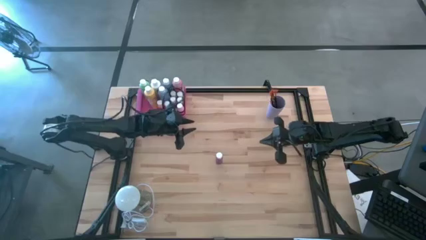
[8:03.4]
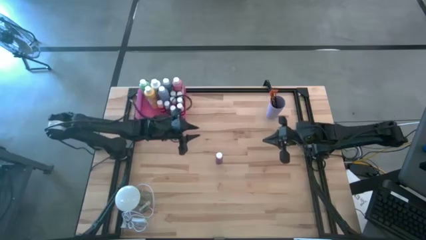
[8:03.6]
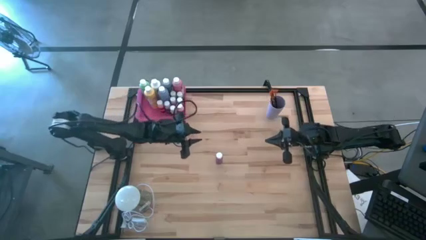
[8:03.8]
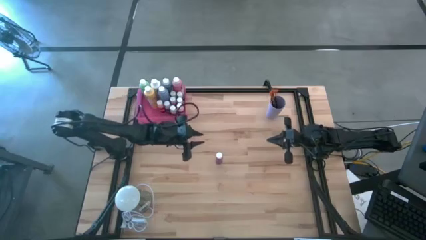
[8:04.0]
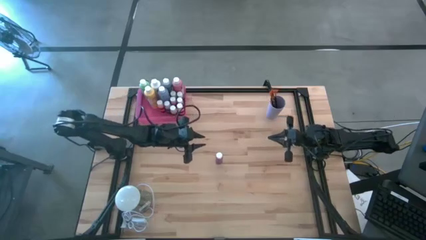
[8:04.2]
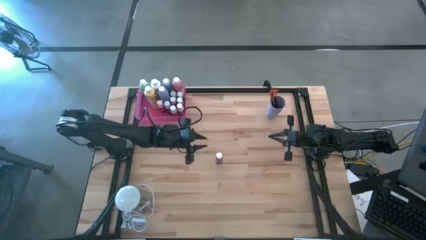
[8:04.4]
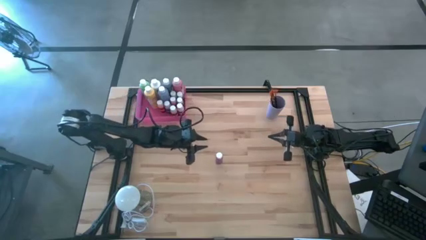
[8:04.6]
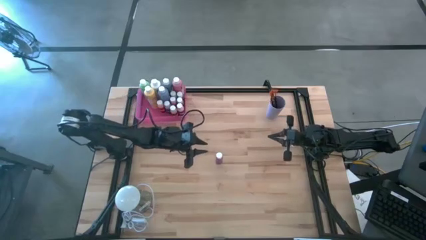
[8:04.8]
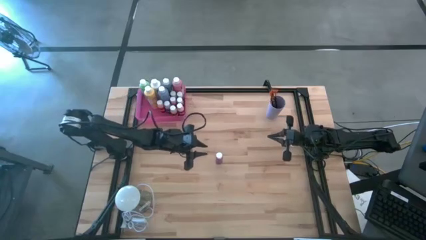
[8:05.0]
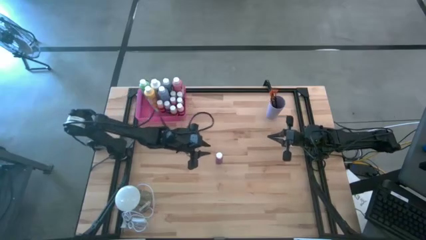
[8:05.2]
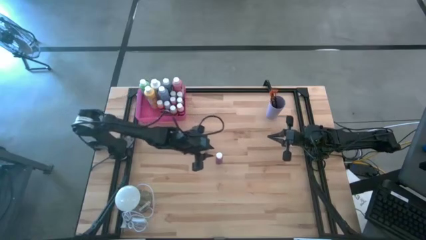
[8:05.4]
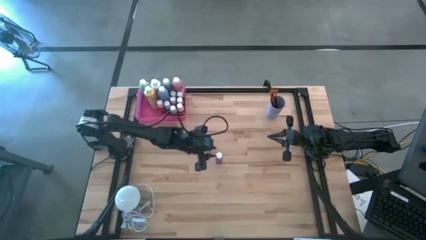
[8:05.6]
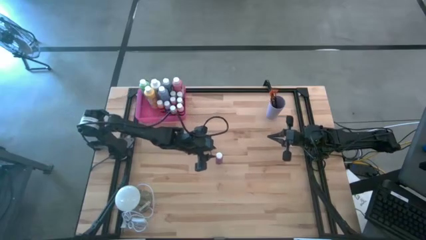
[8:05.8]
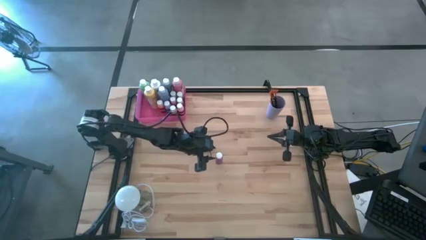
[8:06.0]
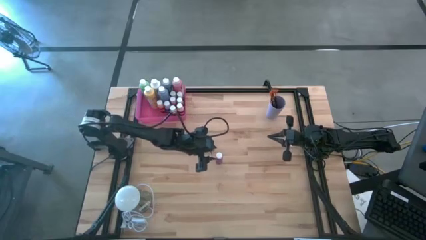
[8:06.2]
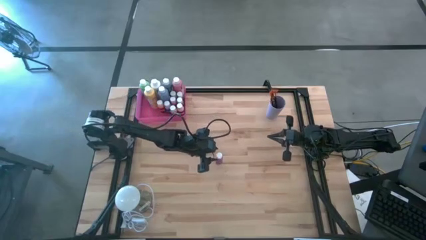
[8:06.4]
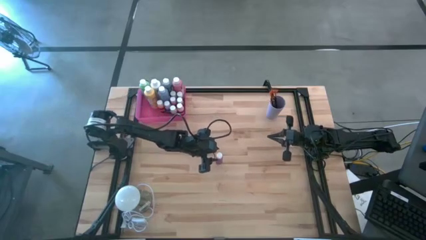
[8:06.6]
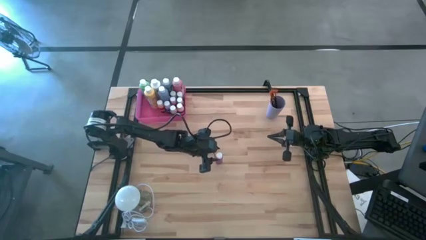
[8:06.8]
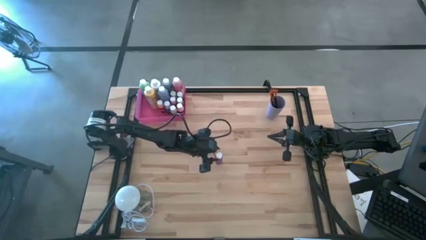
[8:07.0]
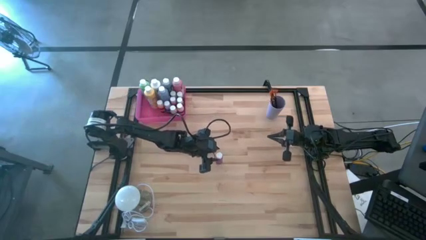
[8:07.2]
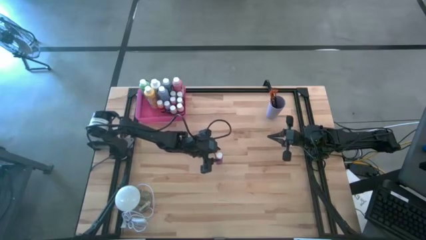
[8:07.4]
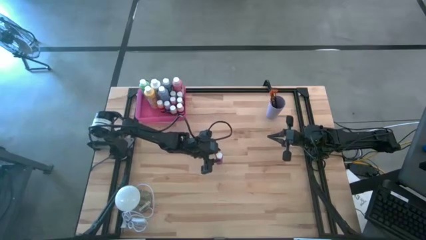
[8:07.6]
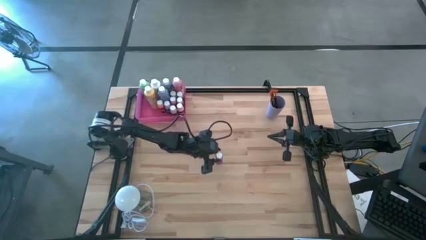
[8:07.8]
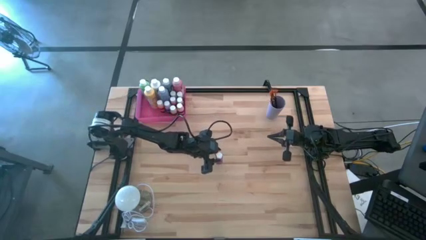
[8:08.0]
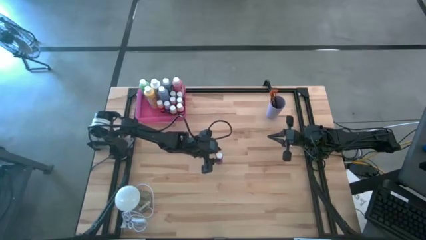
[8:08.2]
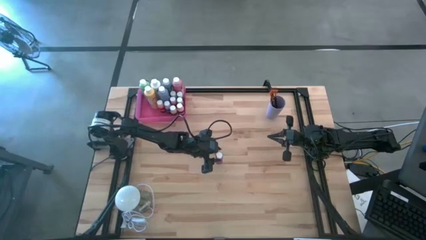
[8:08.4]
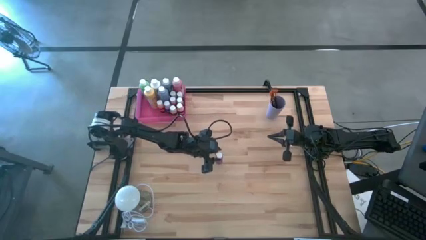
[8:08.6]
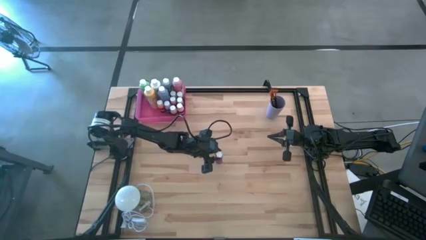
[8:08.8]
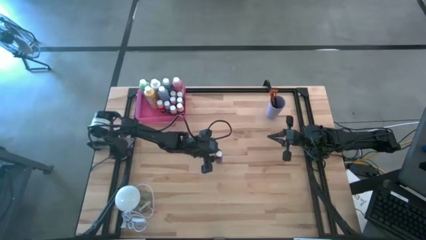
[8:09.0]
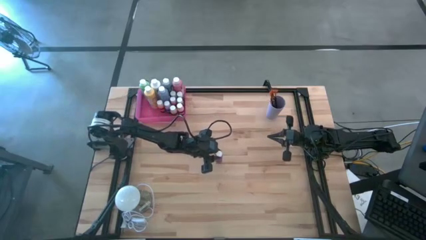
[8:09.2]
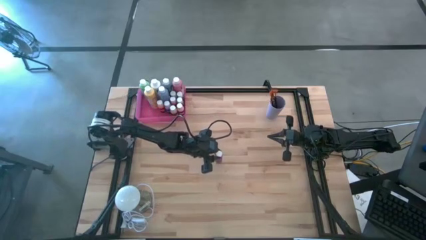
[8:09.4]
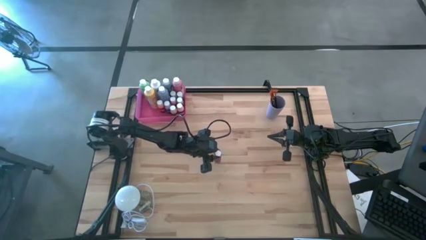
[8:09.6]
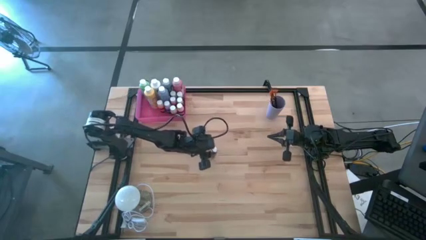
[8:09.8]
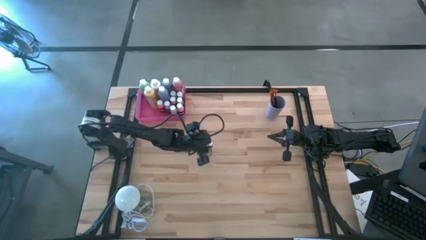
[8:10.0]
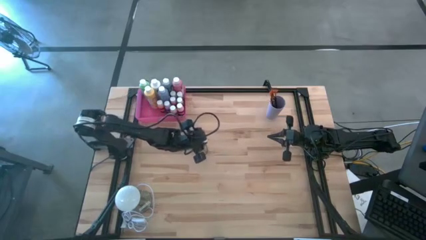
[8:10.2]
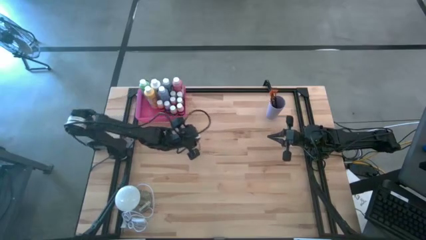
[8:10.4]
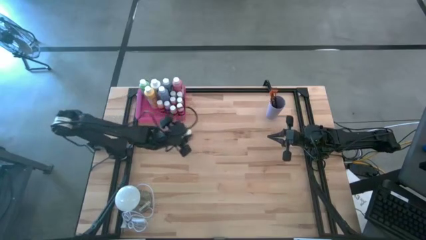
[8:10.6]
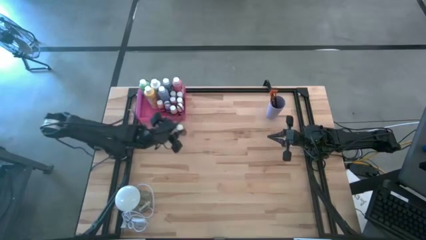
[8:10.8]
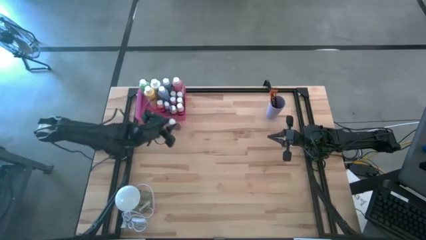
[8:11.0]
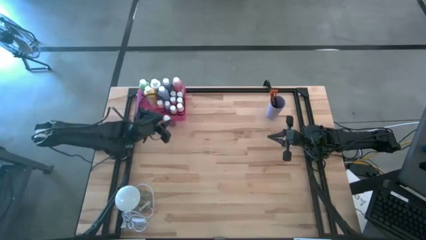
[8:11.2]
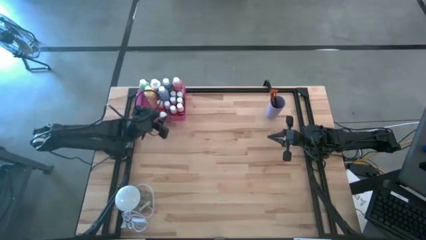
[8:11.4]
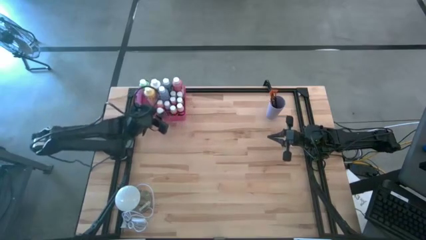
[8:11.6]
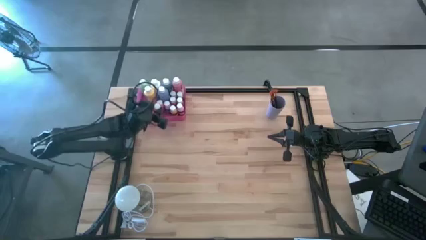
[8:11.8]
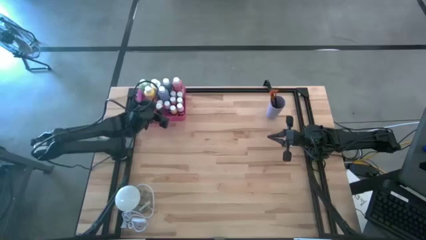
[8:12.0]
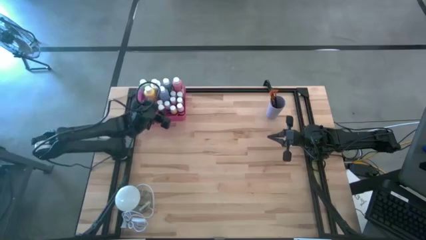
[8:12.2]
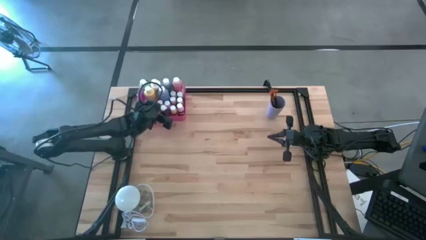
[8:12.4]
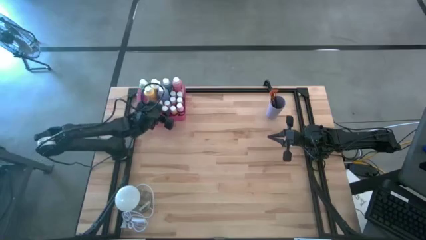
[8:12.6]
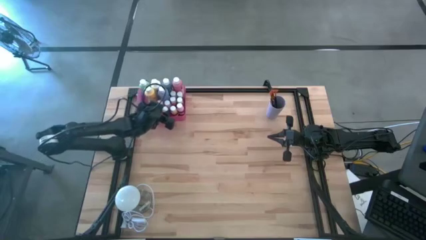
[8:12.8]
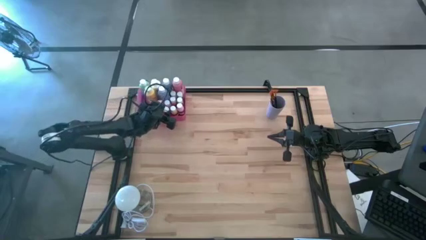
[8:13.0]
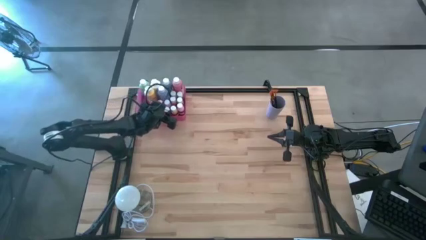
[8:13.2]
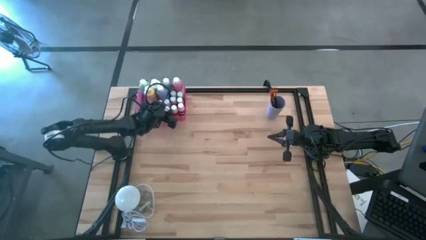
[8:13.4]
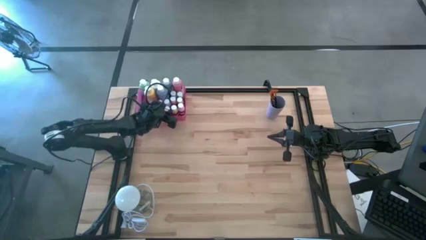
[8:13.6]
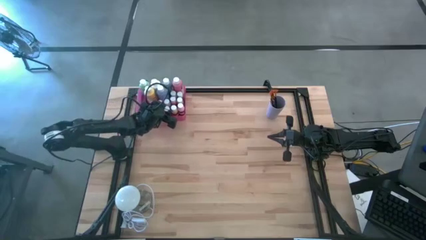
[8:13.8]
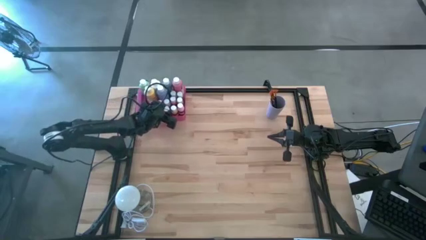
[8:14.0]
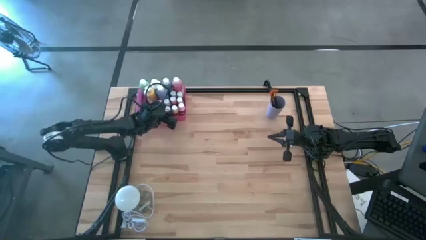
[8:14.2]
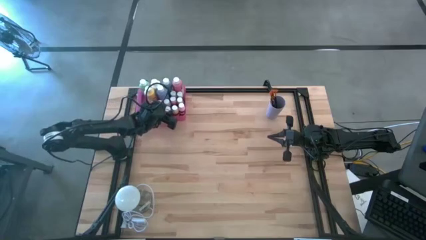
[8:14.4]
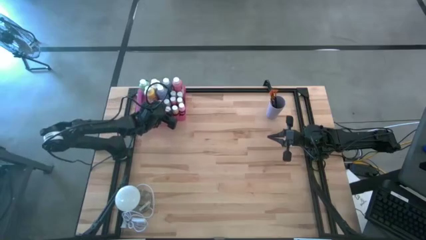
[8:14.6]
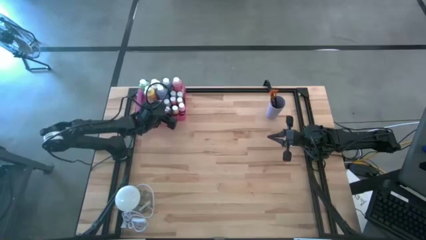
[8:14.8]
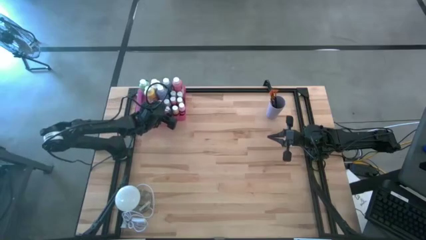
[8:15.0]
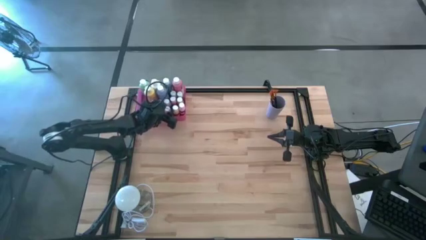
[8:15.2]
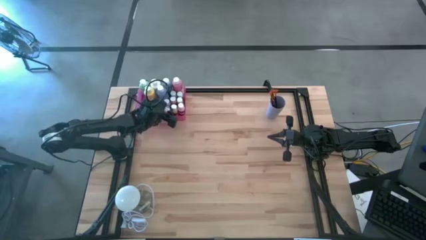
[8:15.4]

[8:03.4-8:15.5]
Task: Pick & Place Paint Supplies
Put the small pink paint bottle into the pink bin

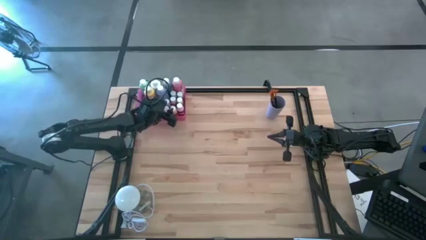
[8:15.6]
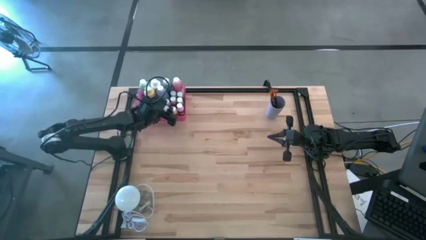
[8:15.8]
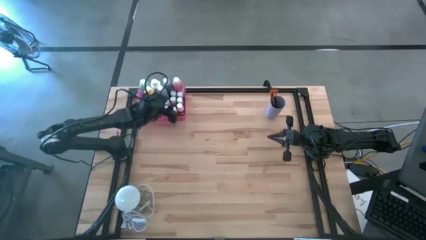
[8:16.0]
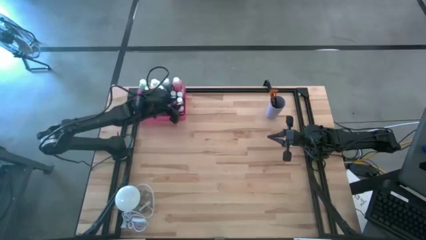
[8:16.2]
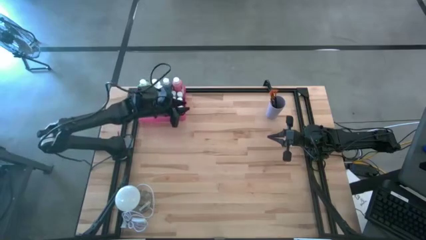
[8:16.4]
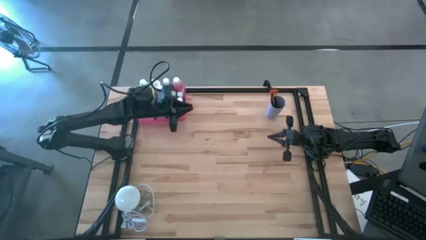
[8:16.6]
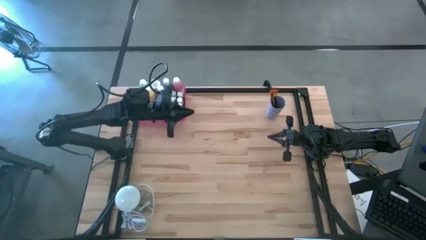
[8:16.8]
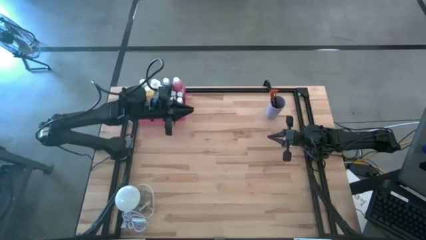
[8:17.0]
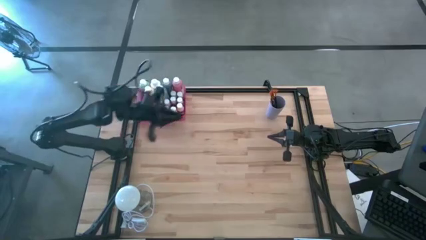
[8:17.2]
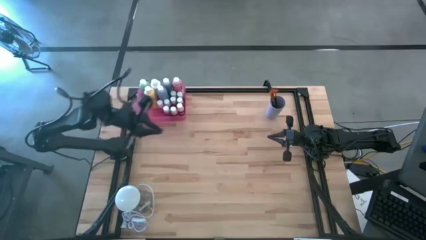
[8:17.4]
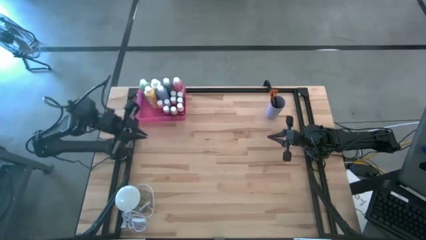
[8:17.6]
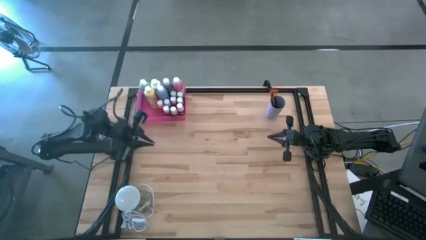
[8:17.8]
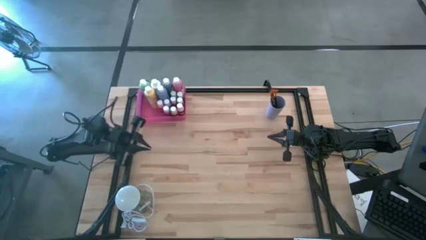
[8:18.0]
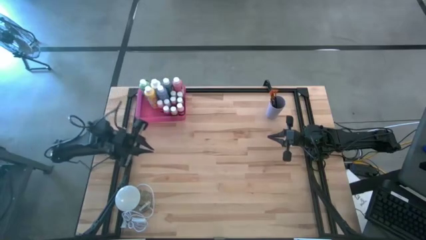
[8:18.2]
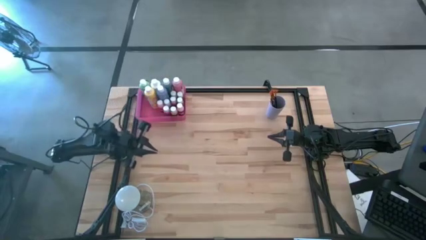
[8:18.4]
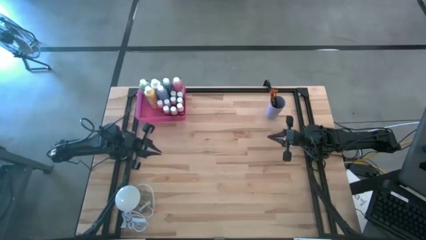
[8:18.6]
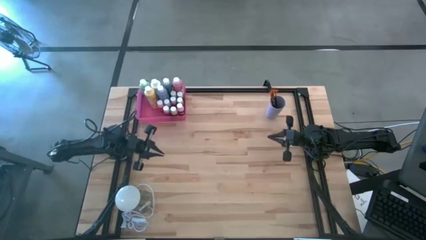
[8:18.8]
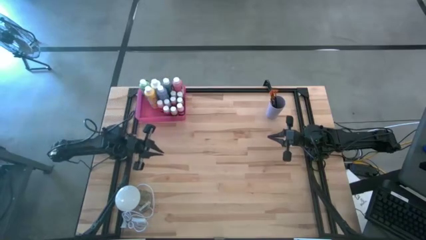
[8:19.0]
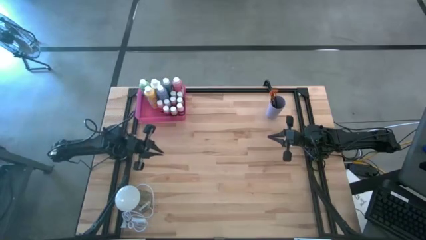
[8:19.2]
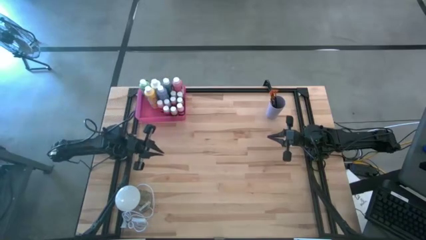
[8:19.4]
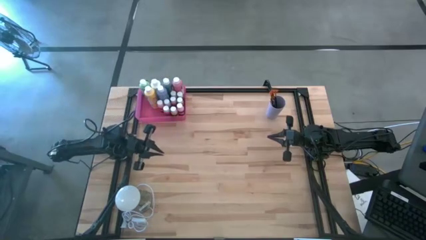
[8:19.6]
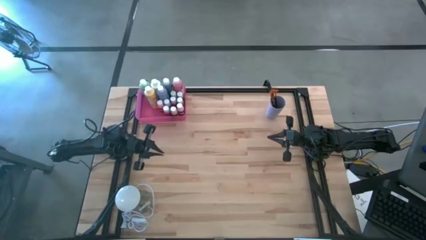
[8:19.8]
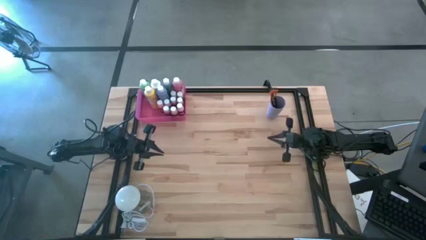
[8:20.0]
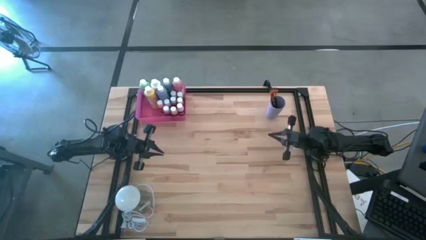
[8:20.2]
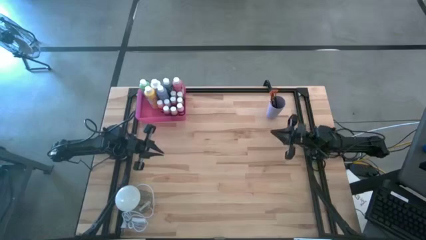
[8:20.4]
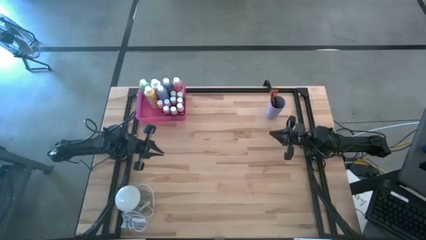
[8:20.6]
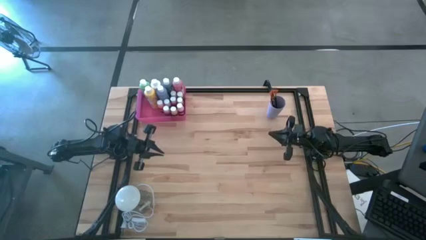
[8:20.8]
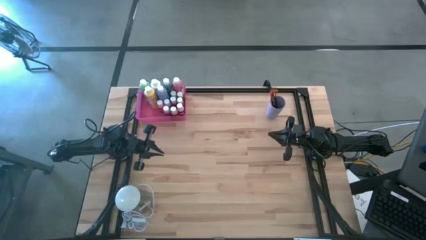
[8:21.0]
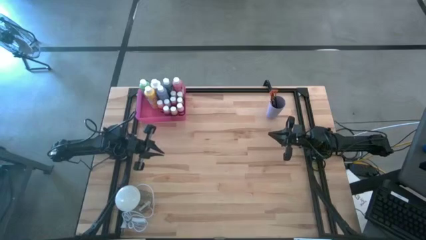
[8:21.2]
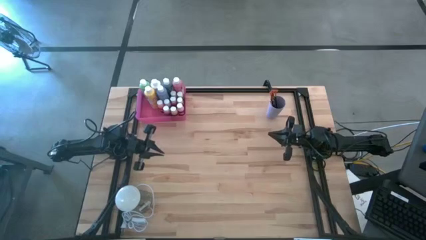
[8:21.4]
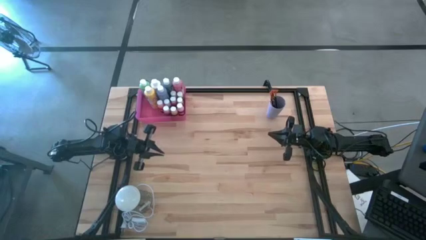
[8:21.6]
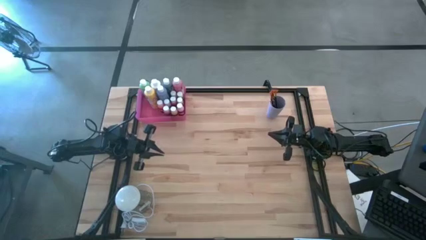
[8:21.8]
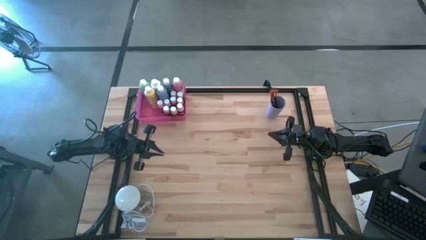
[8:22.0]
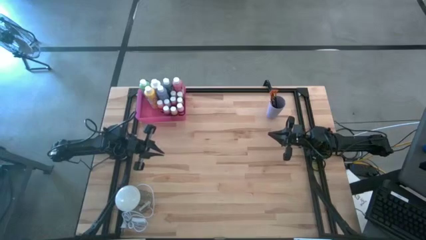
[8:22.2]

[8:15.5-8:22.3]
Return to Home Position
